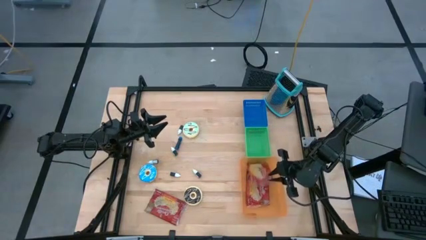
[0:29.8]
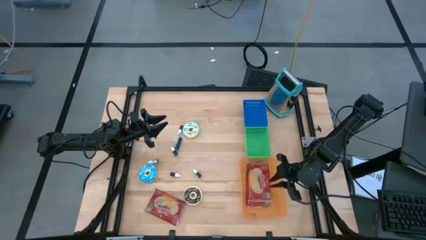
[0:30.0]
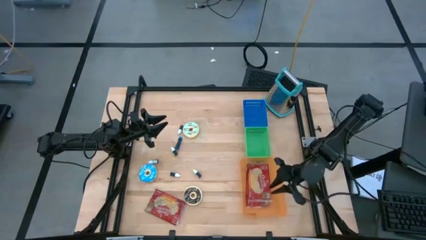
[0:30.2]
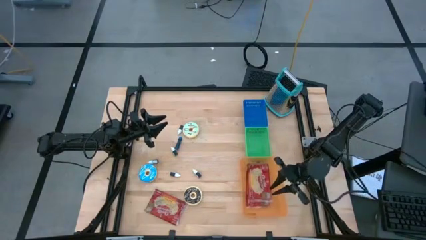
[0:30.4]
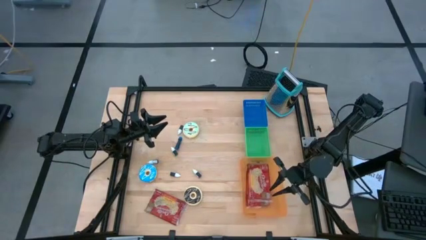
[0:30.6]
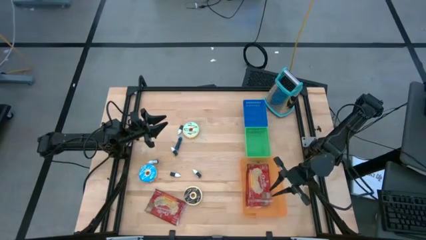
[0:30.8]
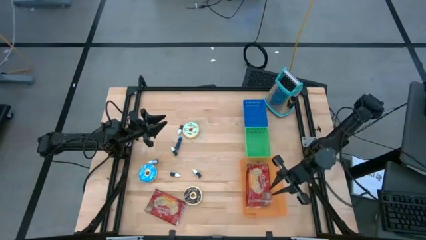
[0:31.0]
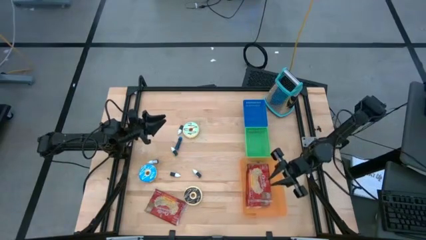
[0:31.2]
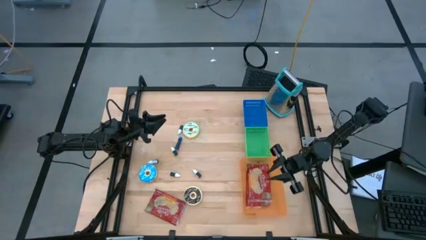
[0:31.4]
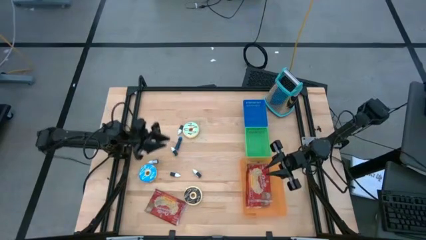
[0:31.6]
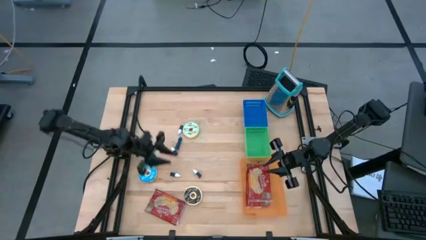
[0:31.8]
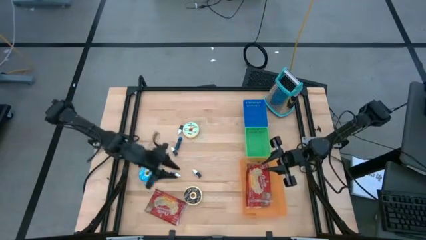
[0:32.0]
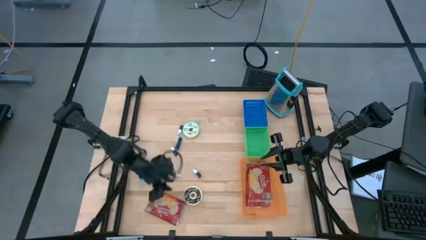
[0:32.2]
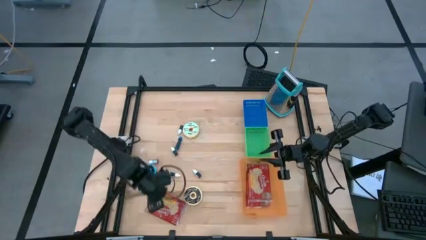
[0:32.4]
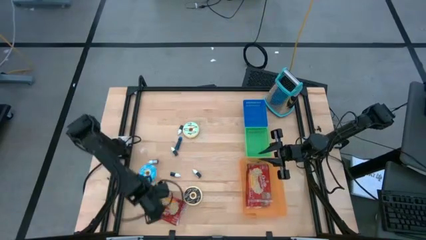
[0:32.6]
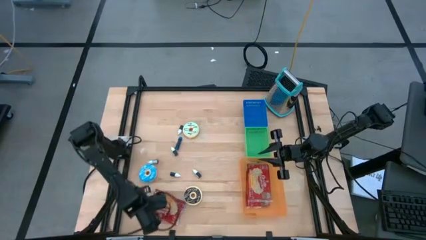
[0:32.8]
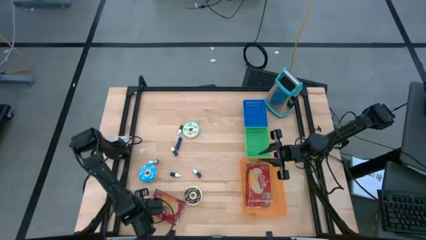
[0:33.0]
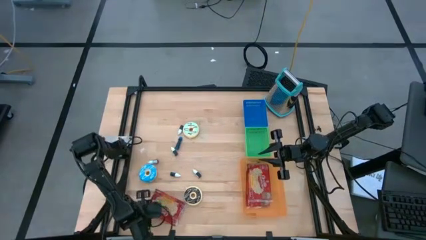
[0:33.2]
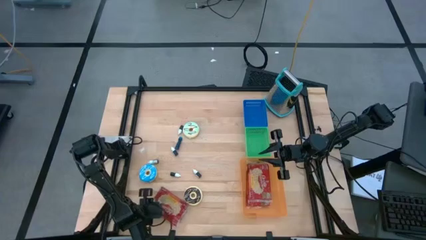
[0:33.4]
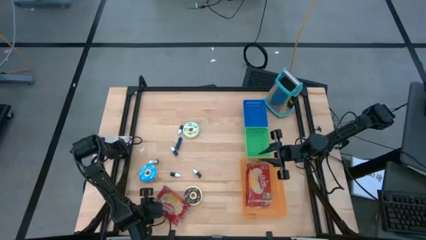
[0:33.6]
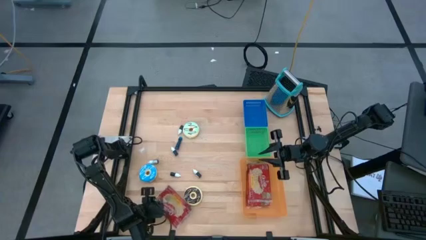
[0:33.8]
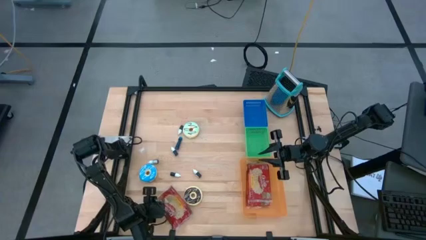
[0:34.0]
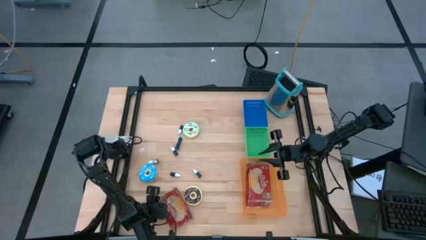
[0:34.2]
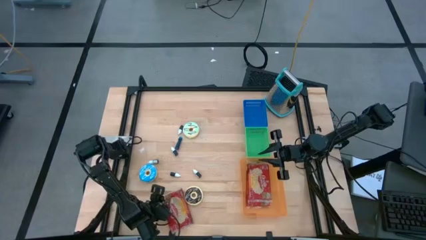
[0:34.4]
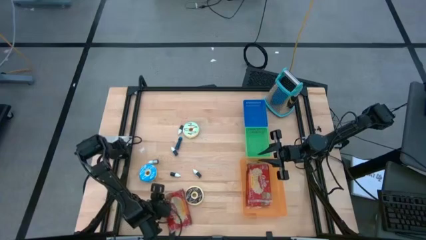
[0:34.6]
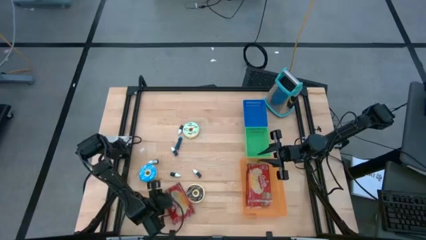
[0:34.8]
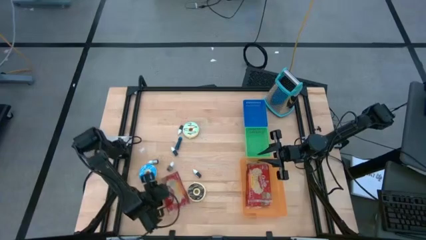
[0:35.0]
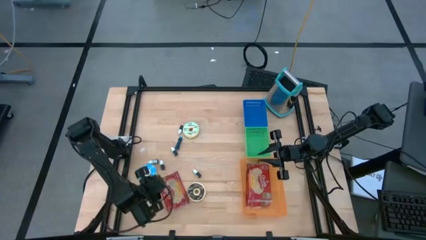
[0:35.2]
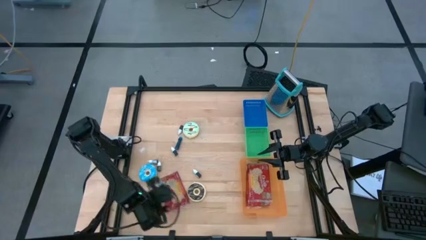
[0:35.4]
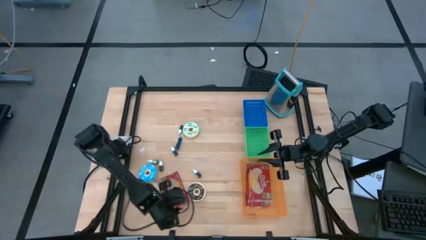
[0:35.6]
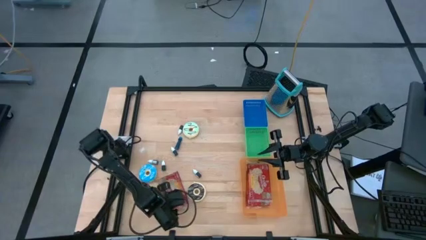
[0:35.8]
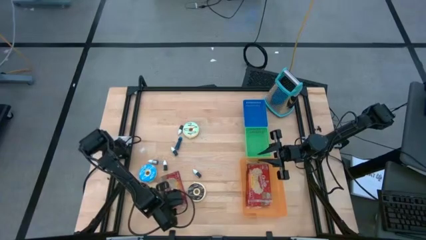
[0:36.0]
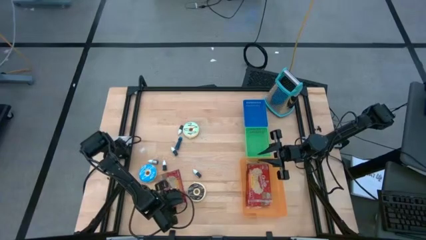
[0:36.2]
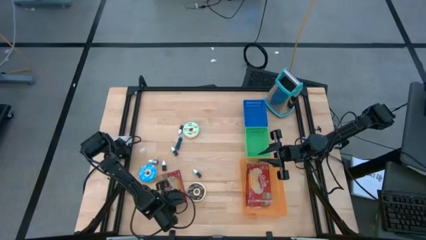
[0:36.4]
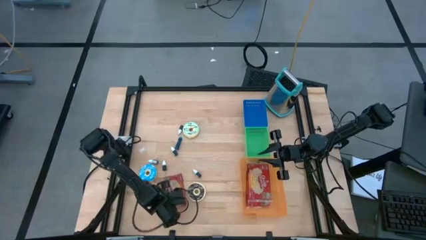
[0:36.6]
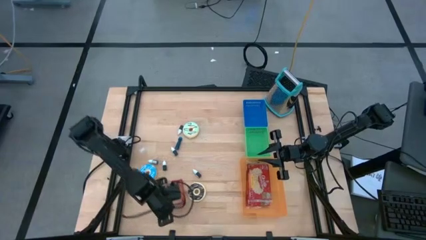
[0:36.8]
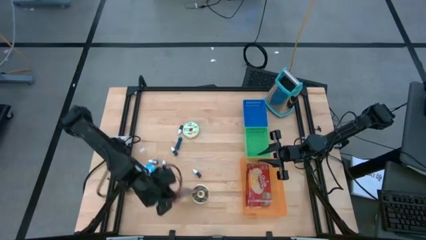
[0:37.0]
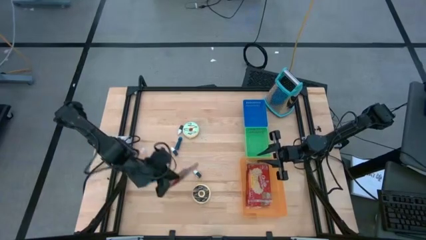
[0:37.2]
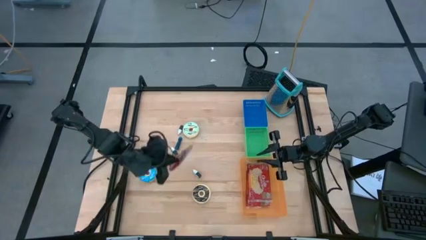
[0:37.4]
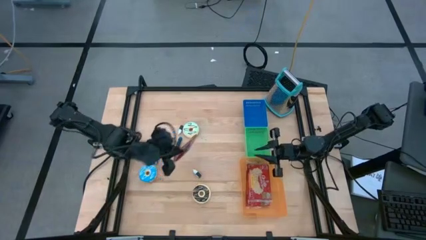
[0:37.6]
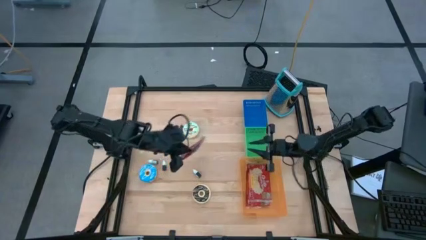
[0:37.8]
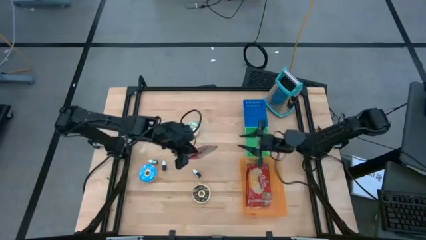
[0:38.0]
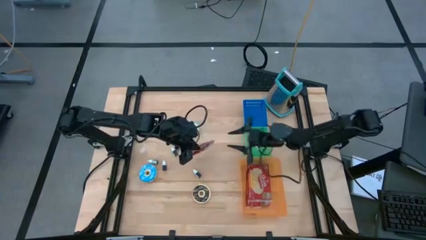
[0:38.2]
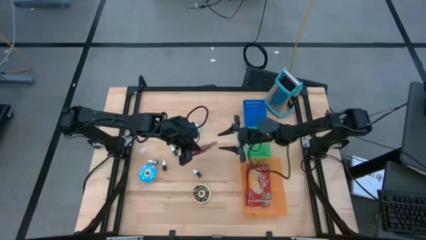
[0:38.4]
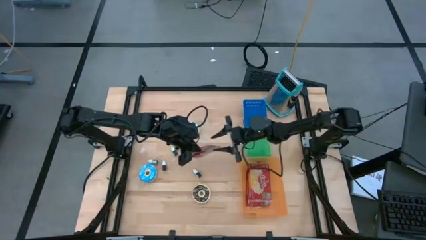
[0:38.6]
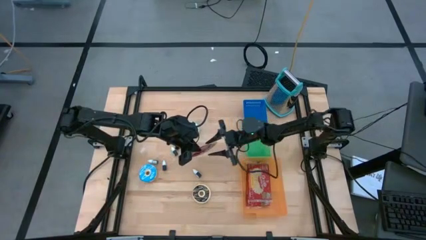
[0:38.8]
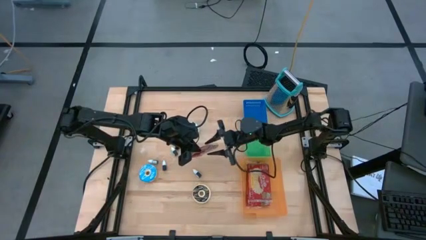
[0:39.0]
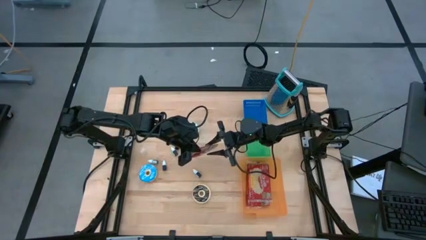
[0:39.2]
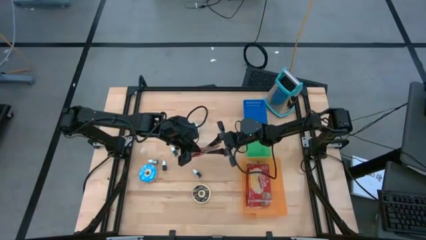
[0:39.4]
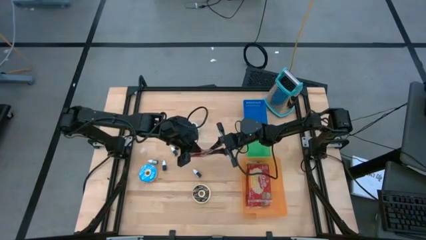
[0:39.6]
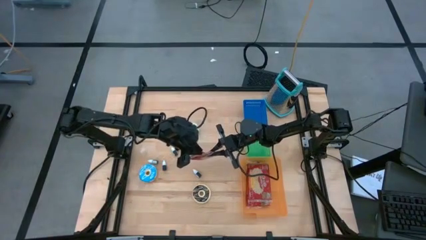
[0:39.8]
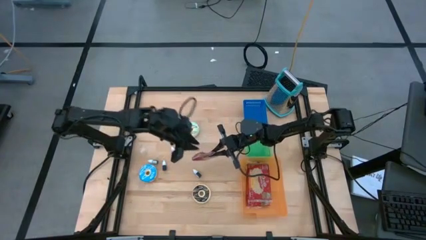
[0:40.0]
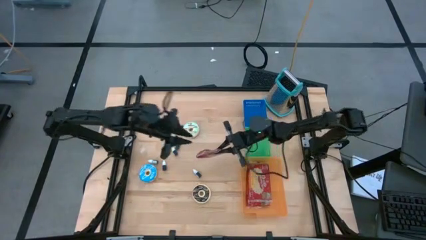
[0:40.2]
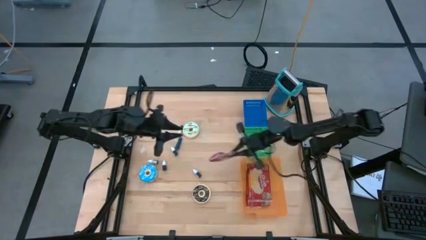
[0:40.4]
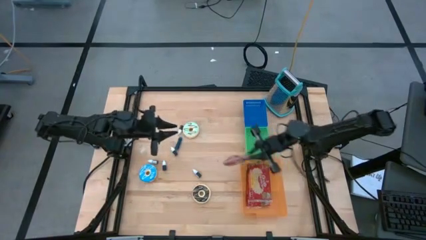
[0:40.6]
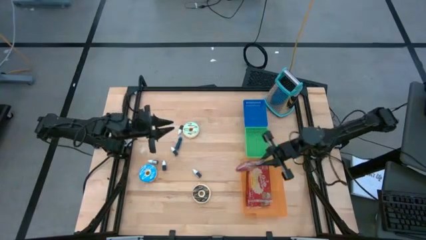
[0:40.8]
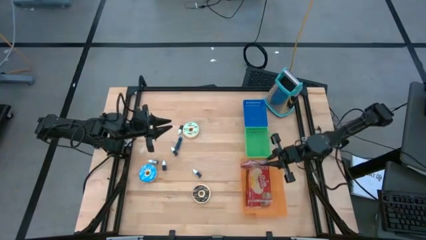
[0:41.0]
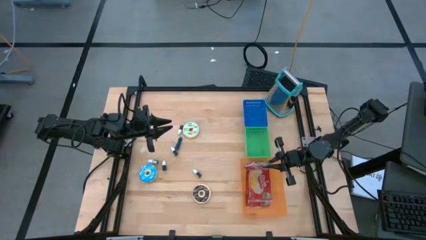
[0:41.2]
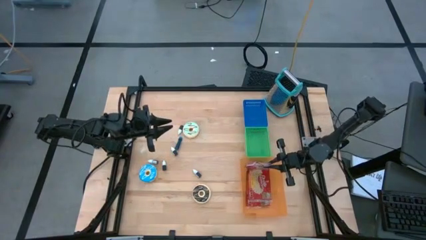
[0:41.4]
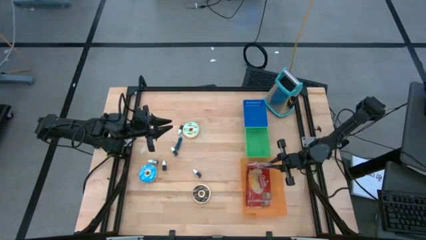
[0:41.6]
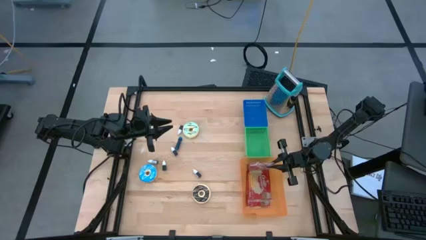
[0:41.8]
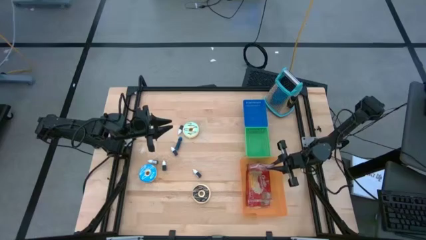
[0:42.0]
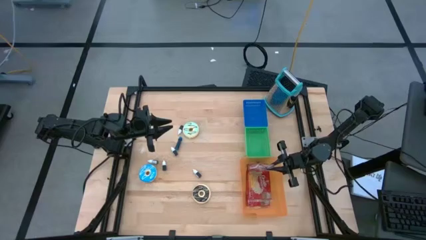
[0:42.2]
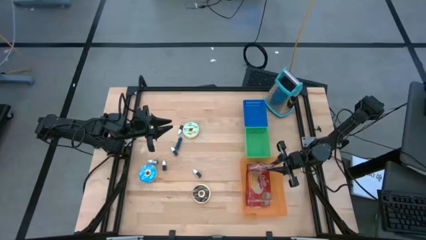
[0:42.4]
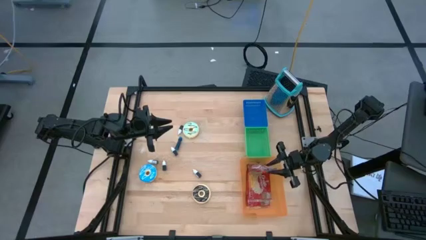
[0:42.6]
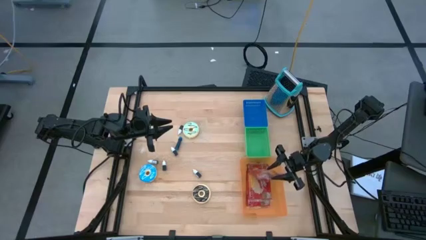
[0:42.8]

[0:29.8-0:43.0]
Put the red popcorn bag into the orange bin
